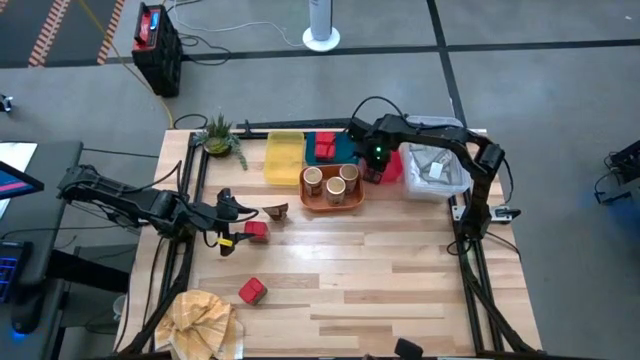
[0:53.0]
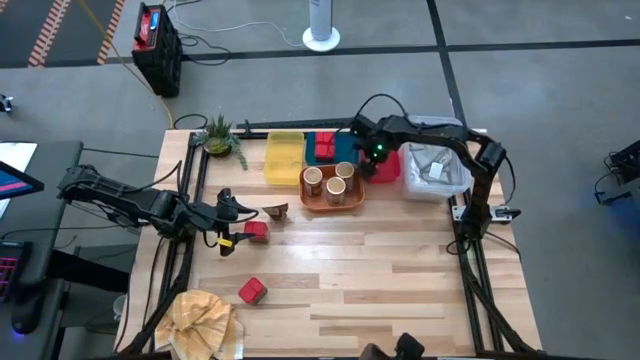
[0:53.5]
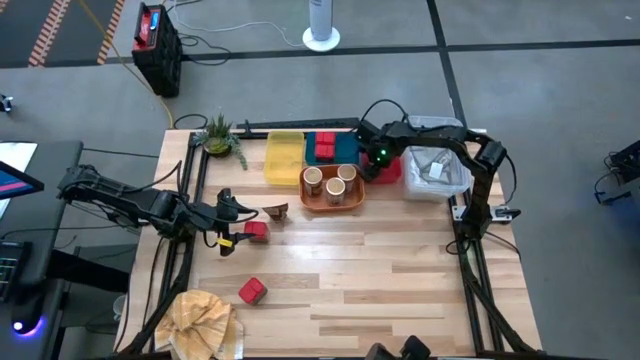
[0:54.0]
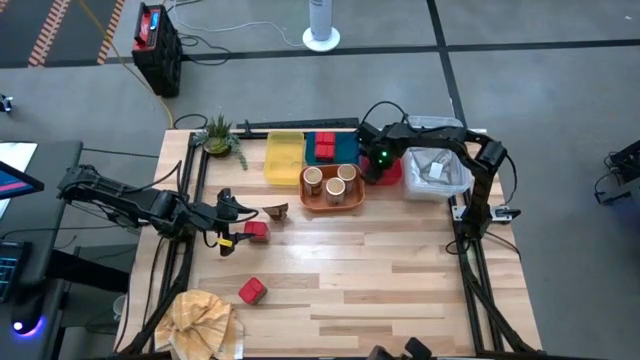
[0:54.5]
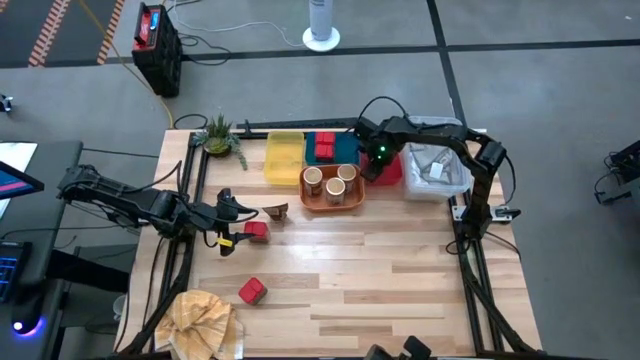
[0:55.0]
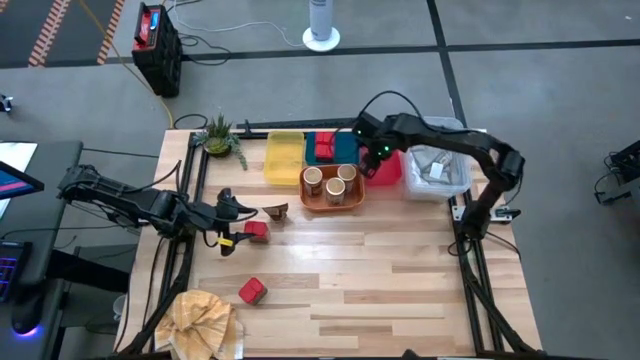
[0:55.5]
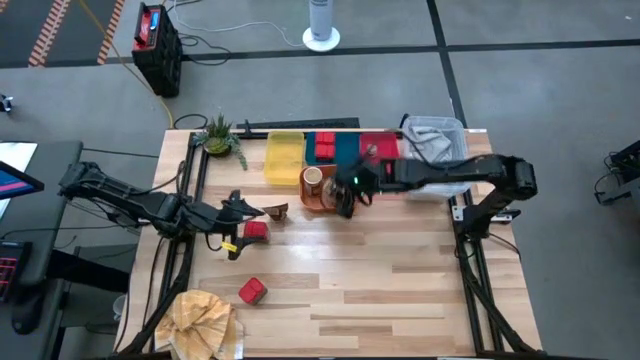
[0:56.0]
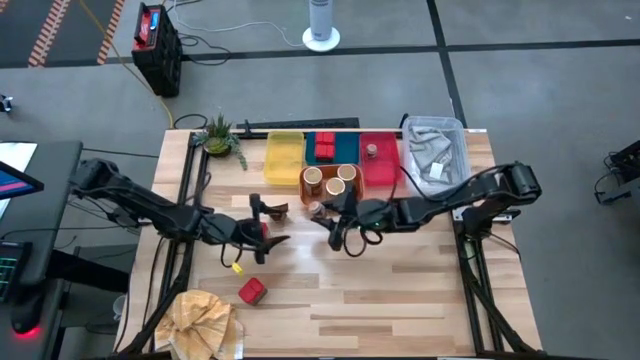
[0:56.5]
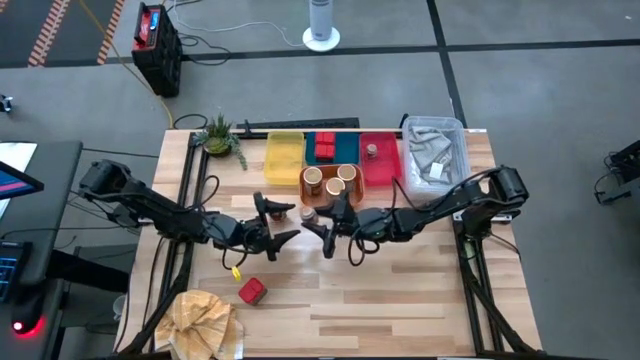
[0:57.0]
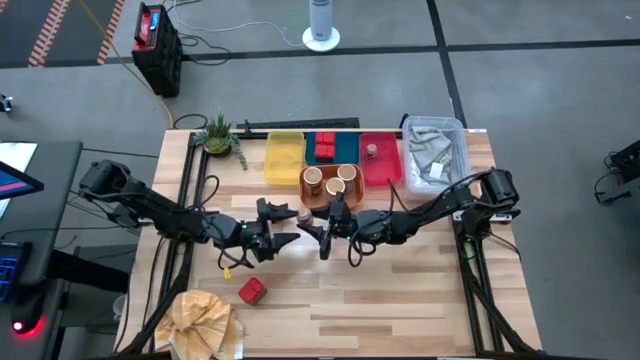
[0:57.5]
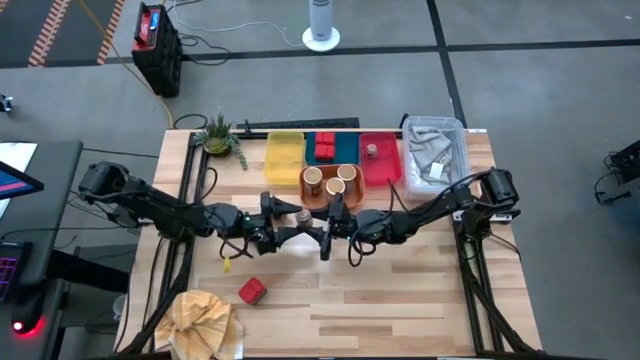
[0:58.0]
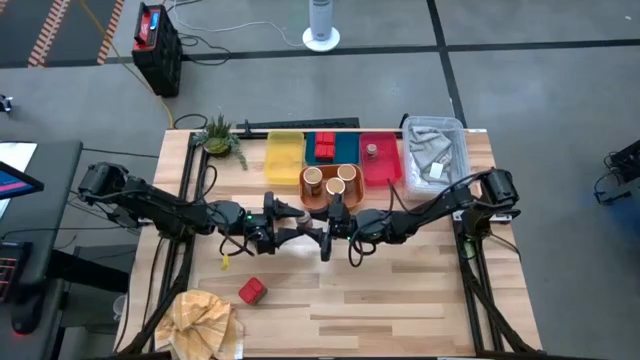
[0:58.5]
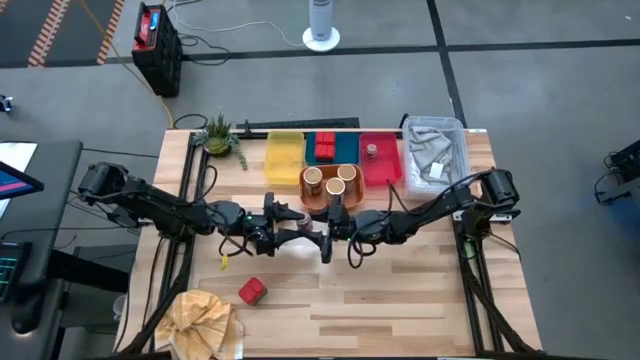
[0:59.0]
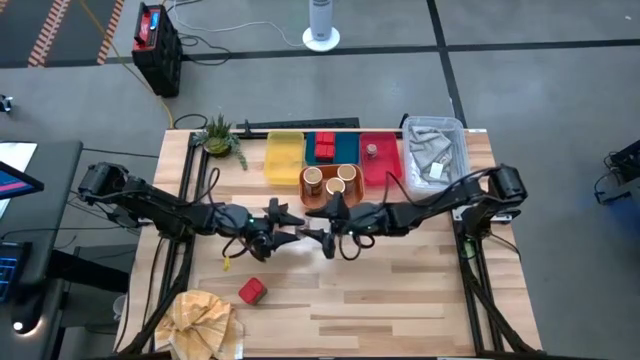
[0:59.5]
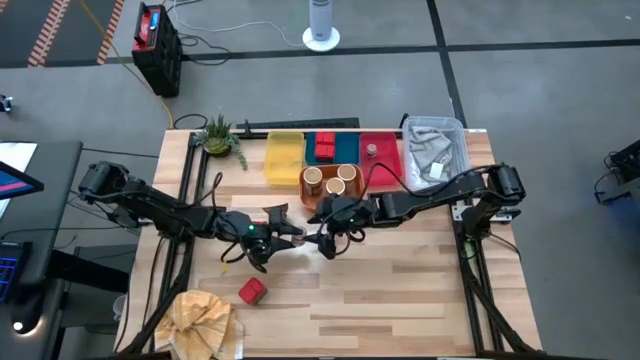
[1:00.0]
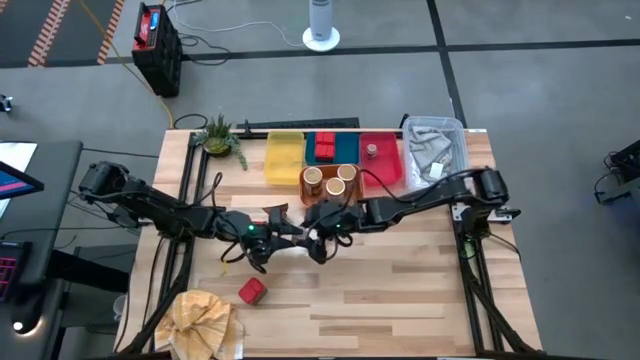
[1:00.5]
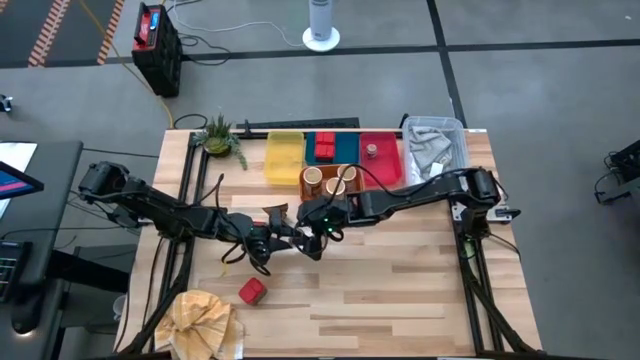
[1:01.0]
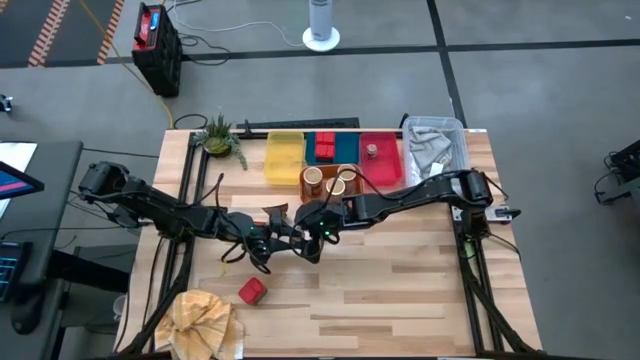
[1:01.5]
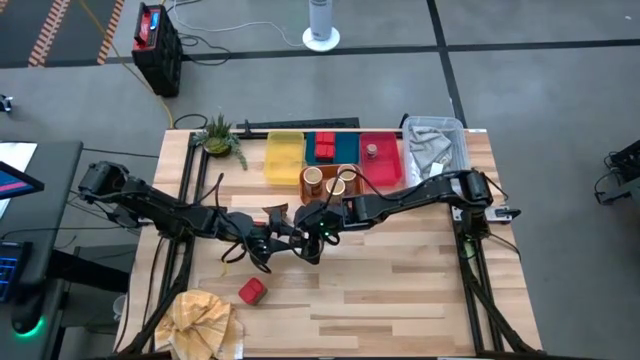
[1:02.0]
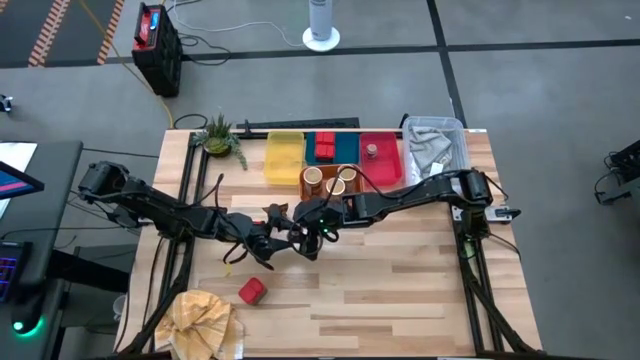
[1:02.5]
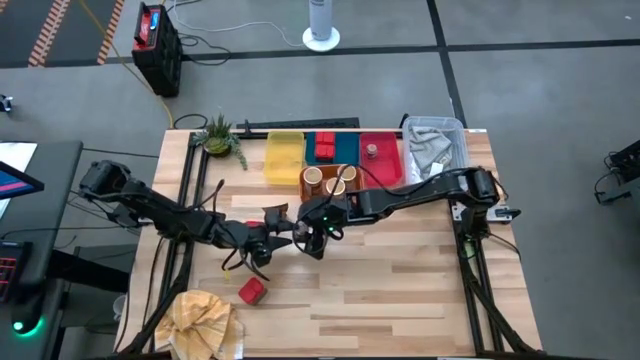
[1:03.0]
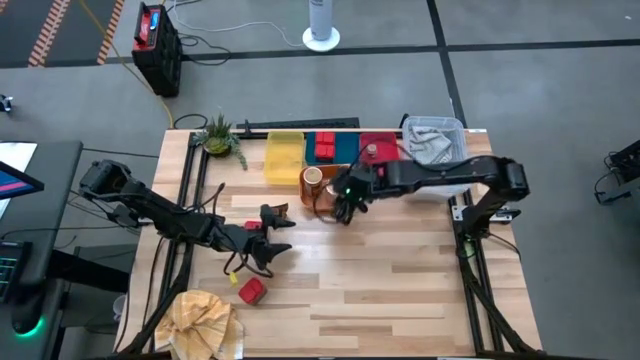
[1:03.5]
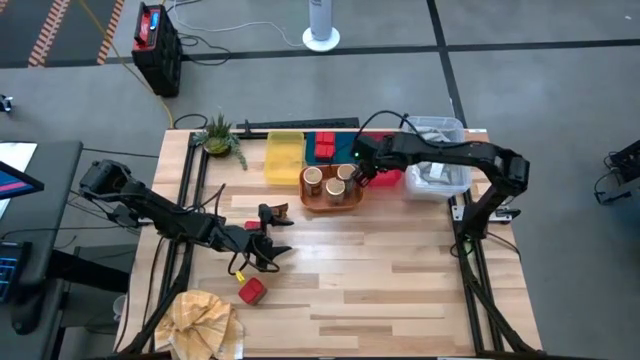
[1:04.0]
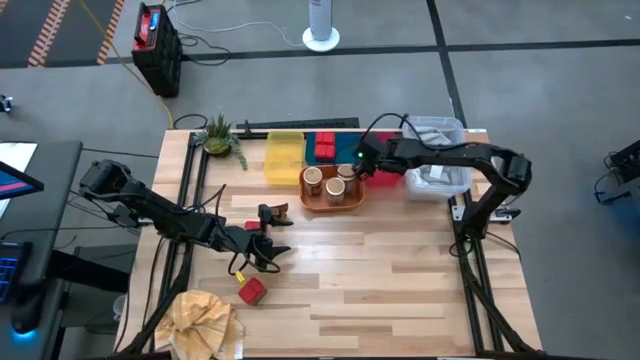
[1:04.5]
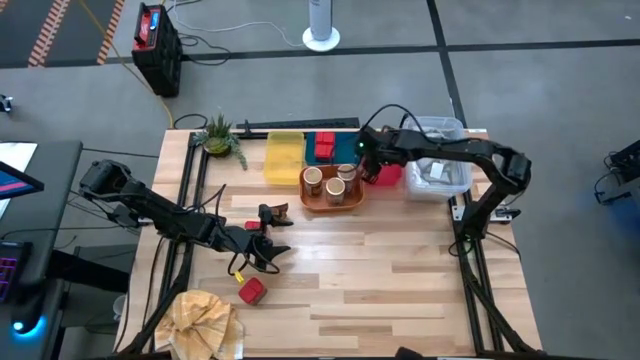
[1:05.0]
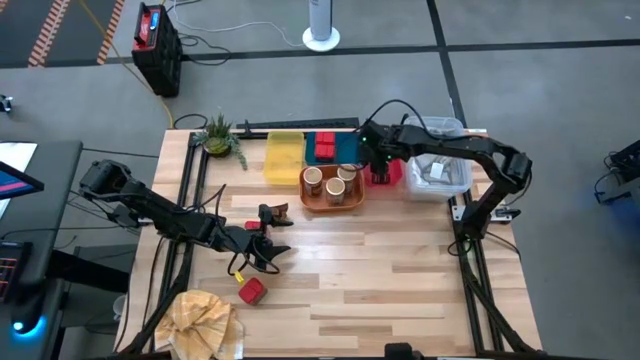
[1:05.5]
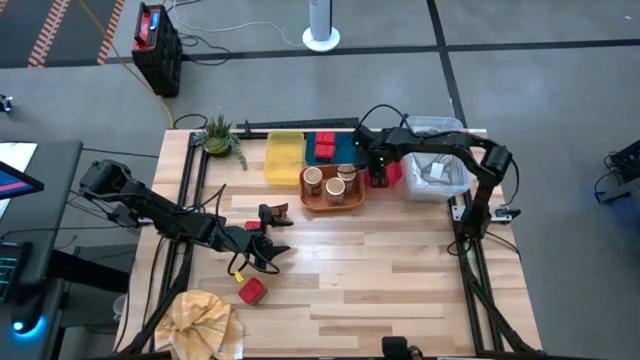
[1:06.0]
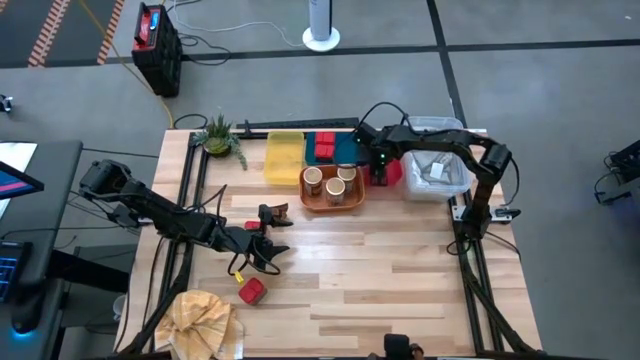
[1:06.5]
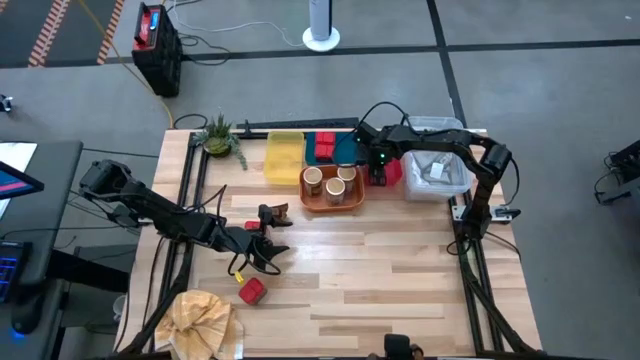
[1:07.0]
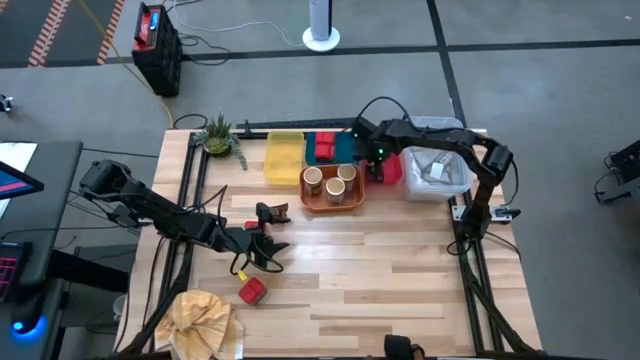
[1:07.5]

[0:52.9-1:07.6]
Task: Sort spices by type
Put the brown seasoning bottle into the red bin

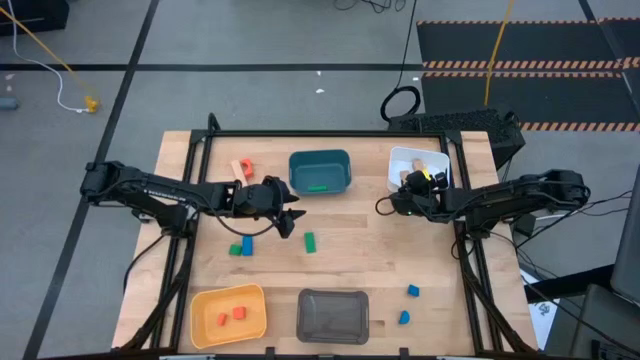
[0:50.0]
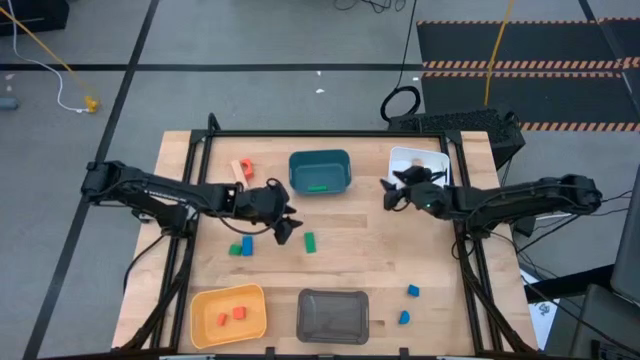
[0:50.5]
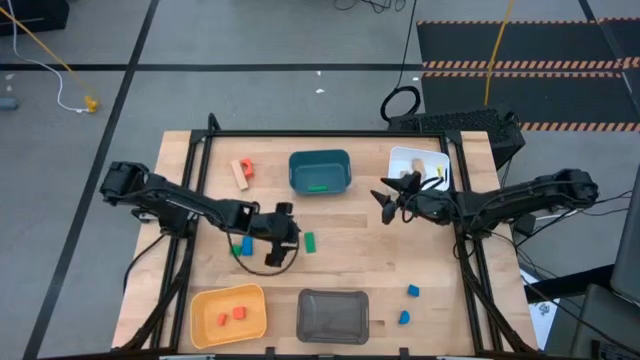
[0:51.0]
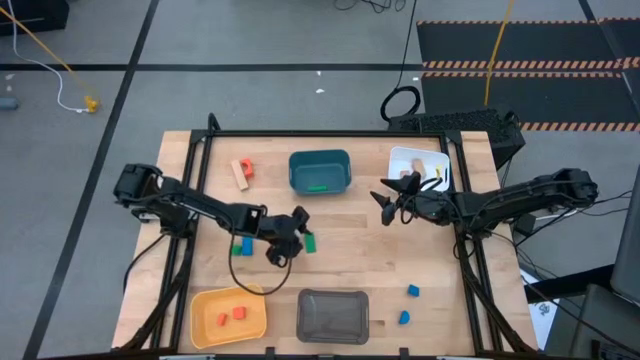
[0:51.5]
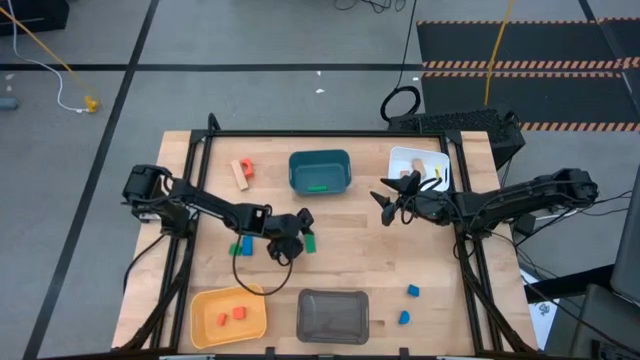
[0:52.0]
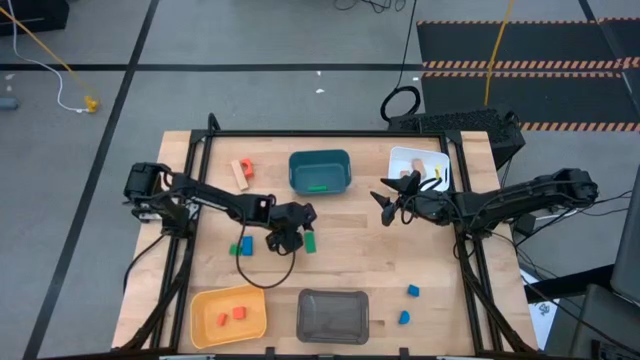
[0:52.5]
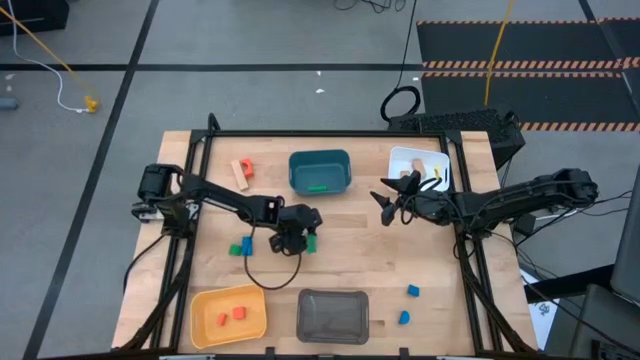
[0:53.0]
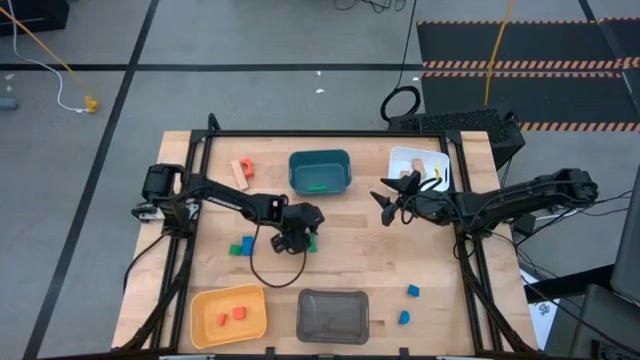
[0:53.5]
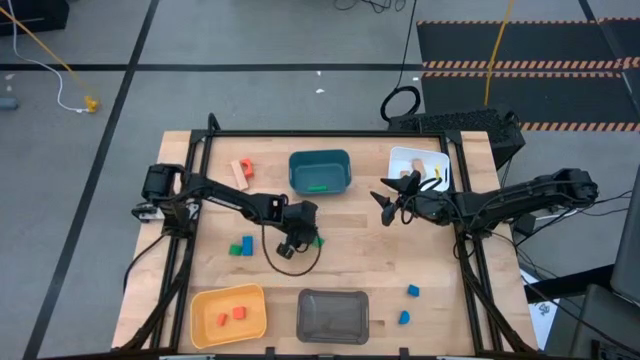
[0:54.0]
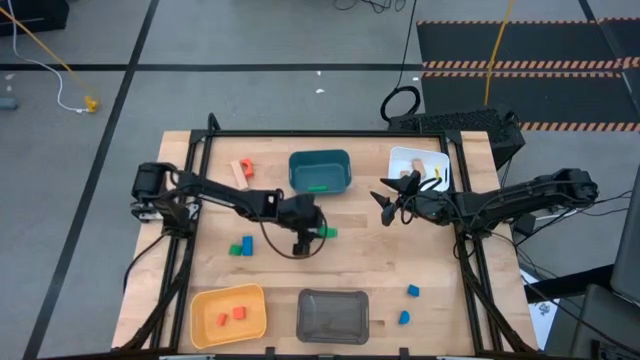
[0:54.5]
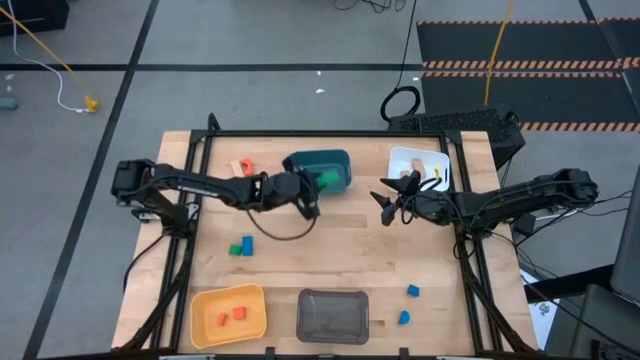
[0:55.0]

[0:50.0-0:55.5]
Task: Sort & place blocks by color
Put the right green block into the blue bin
